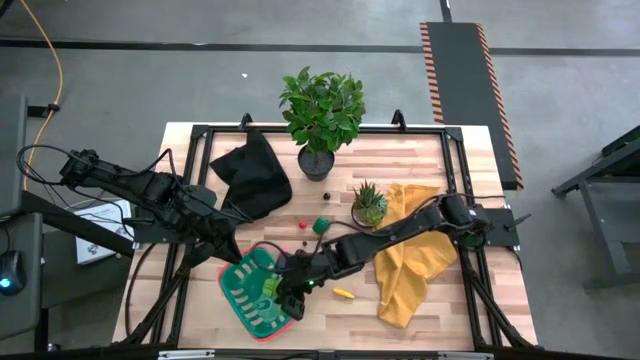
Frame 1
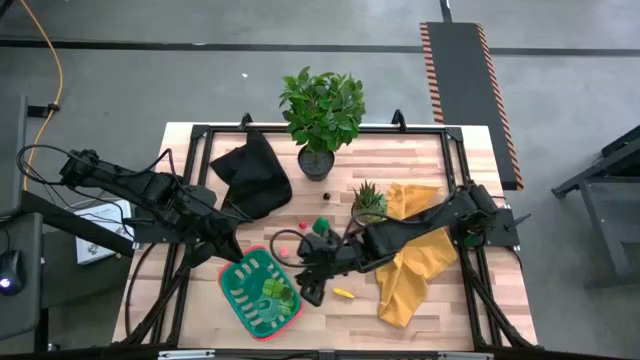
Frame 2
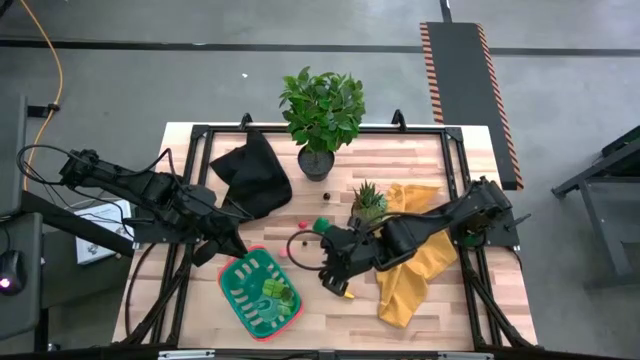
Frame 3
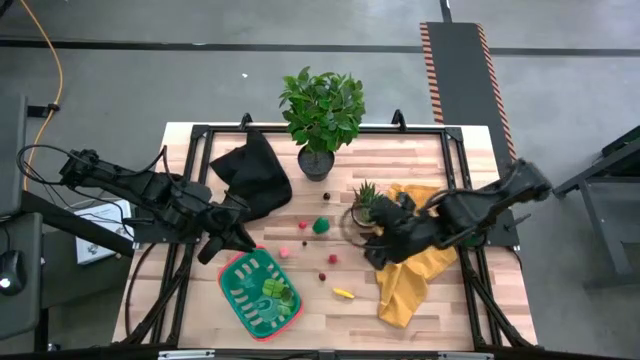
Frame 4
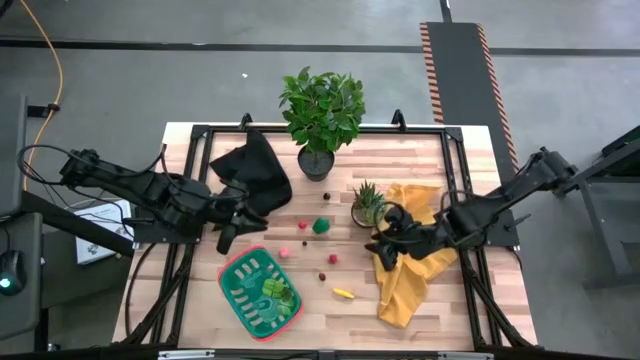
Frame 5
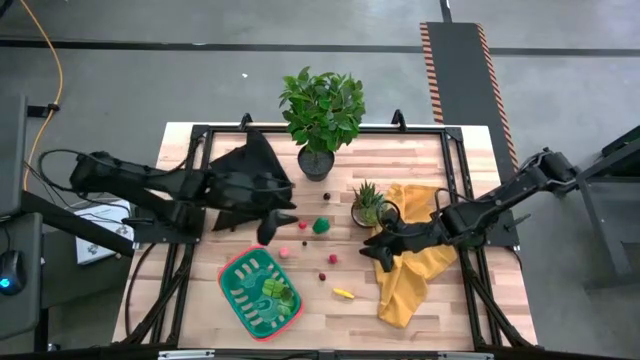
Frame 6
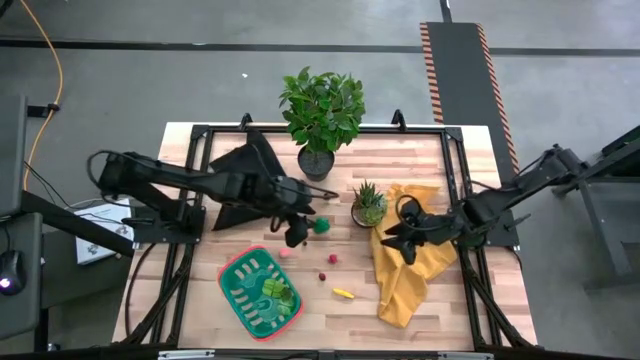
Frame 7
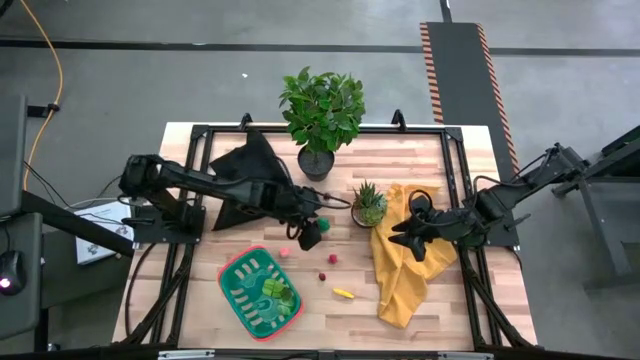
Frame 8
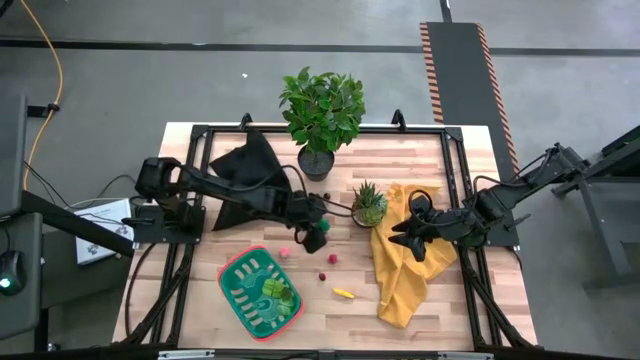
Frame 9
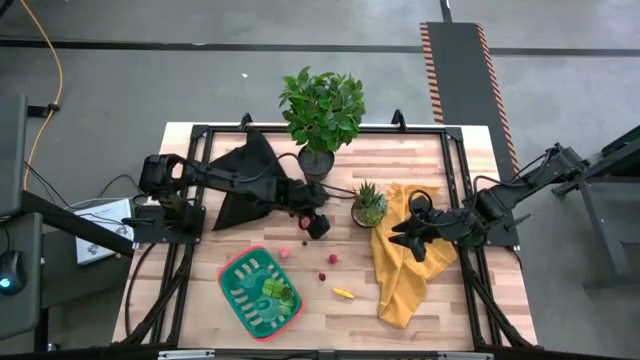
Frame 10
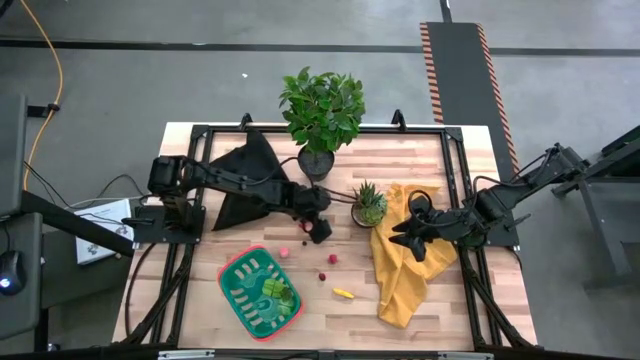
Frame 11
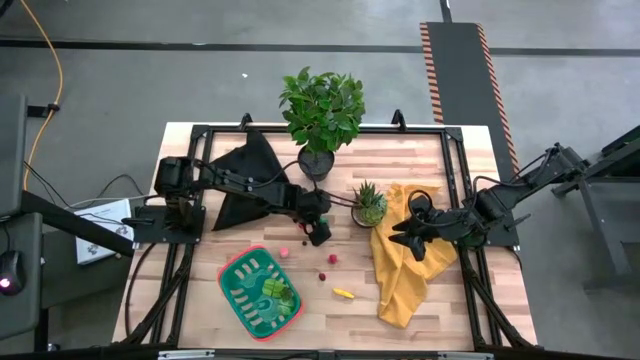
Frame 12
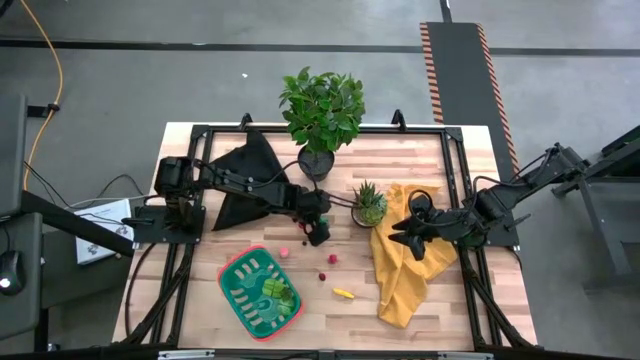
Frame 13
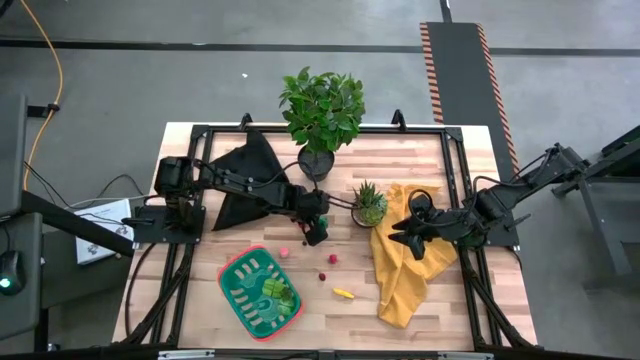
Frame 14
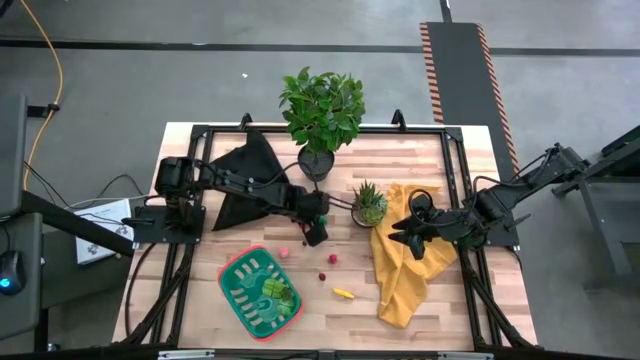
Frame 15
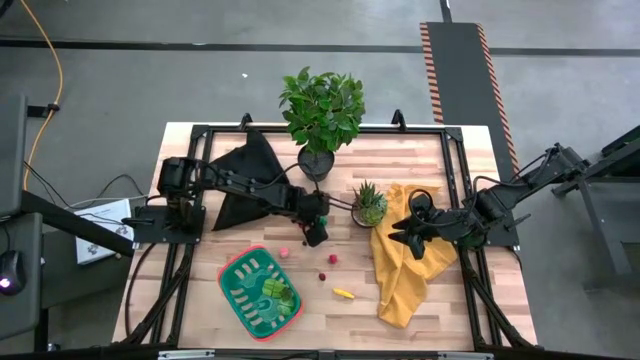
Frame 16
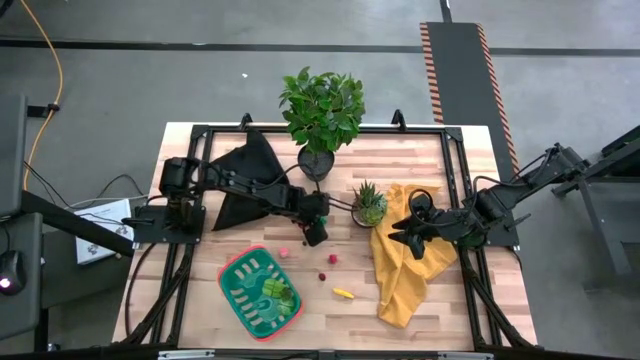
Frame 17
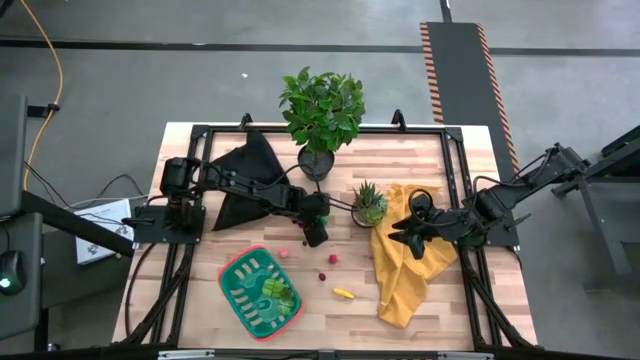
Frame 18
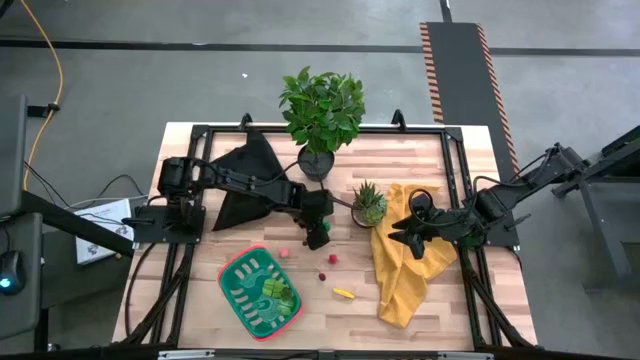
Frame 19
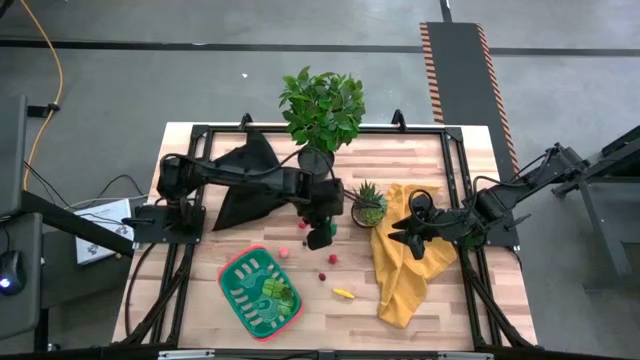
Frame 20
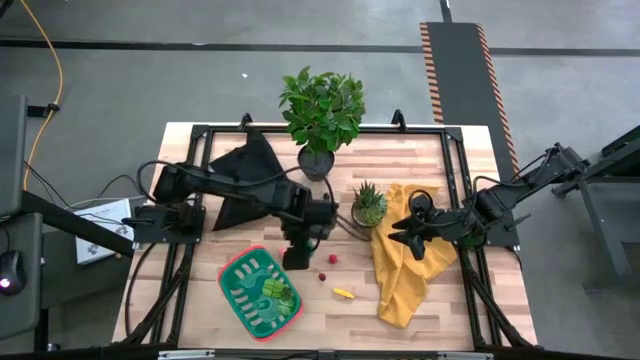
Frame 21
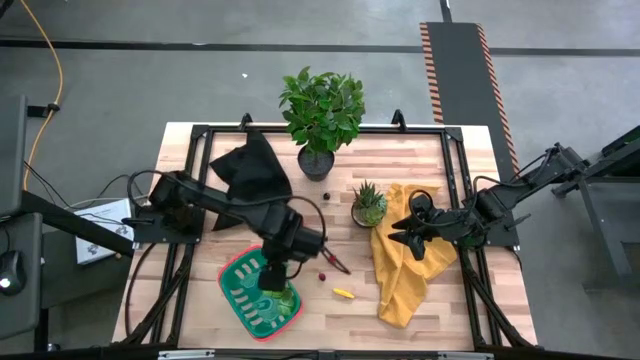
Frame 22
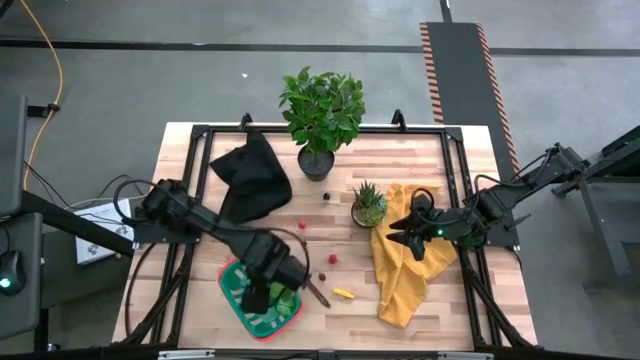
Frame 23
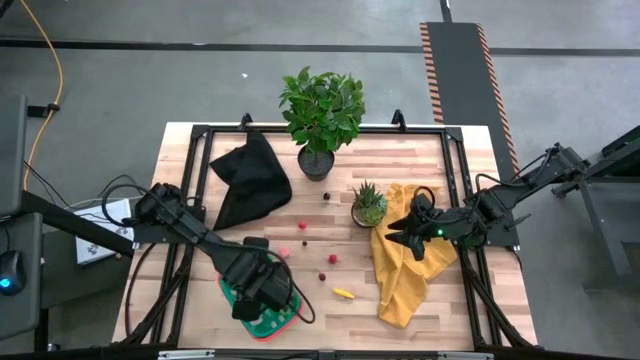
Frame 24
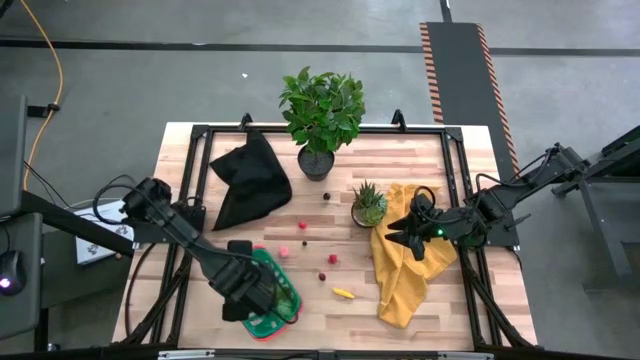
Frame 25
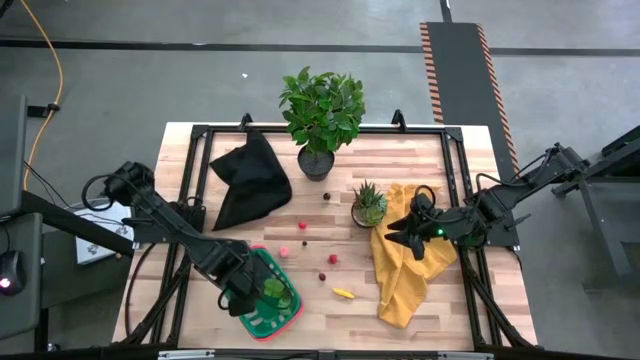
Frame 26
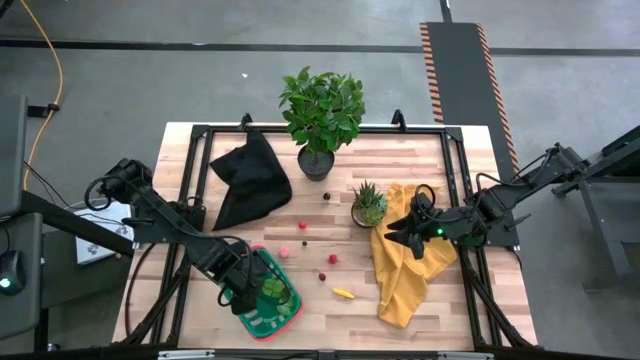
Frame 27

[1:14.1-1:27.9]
Task: Pick and placing Produce into tupperware
Put the green bell pepper into the blue basket

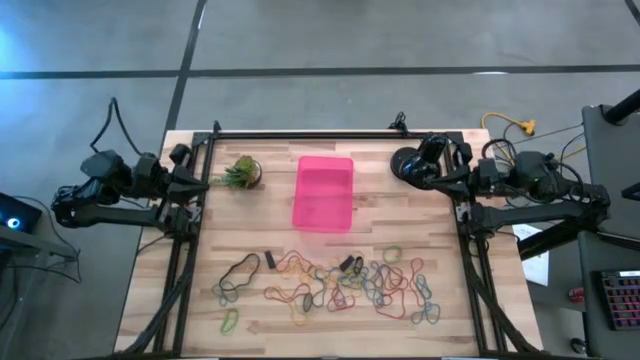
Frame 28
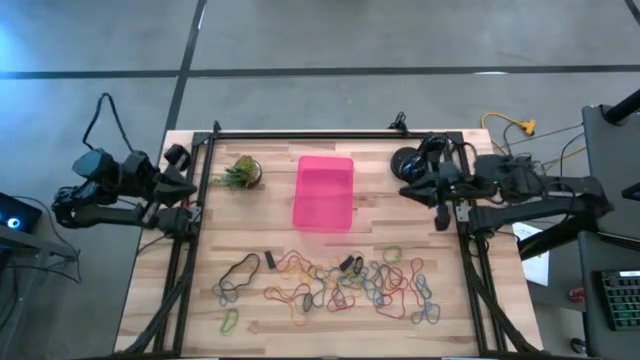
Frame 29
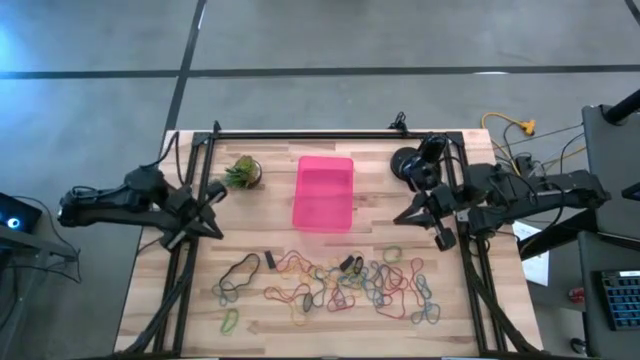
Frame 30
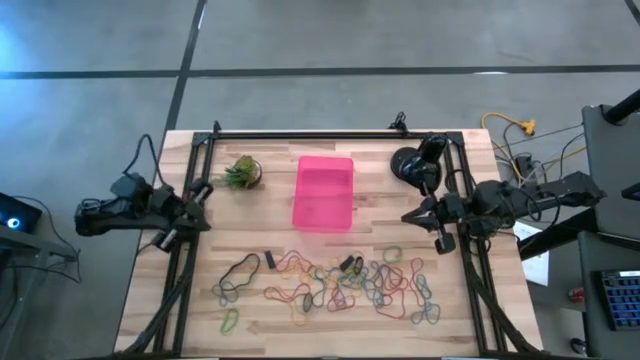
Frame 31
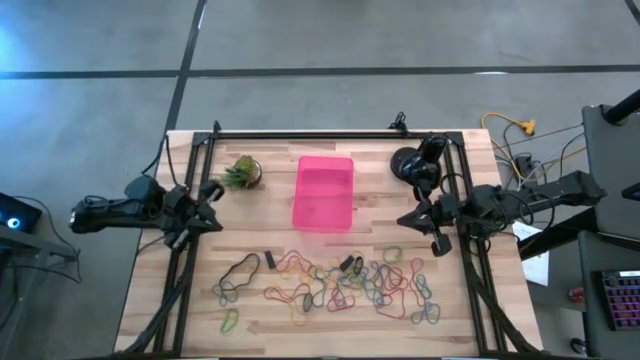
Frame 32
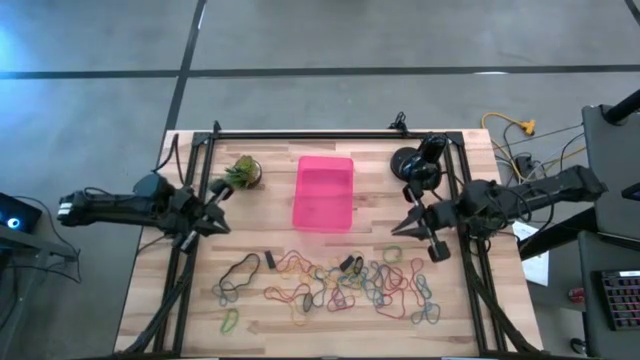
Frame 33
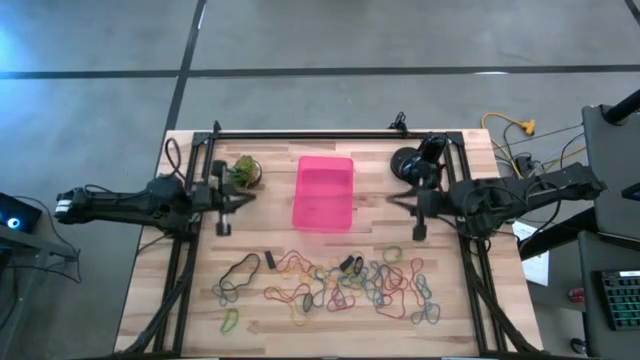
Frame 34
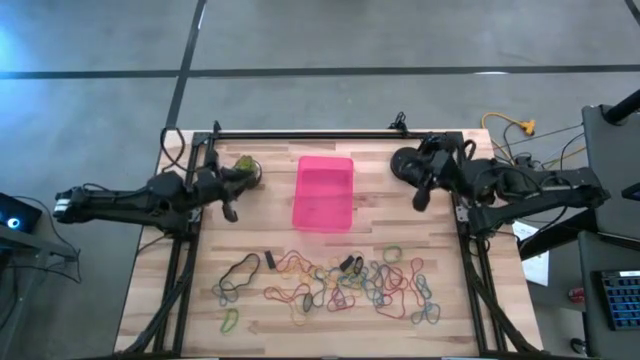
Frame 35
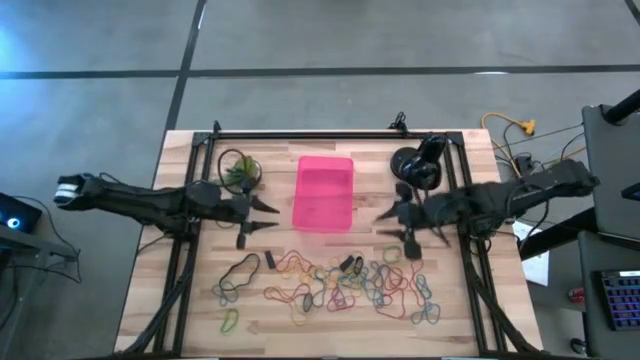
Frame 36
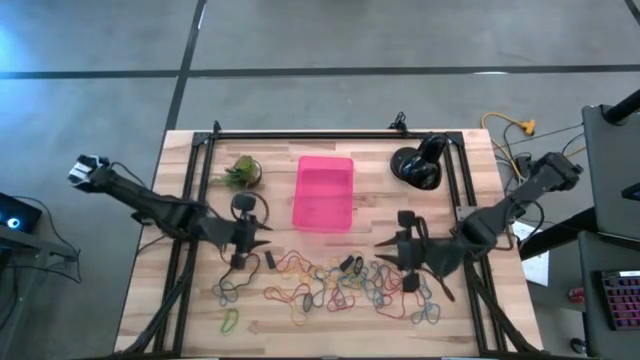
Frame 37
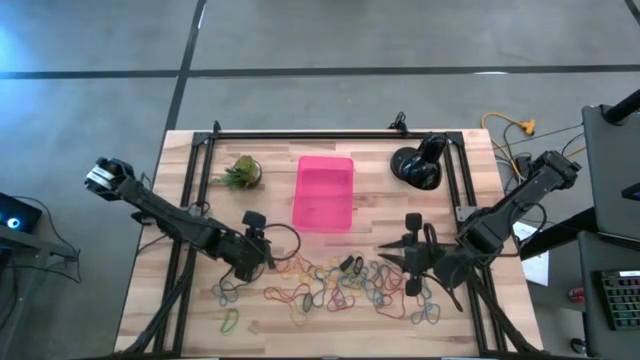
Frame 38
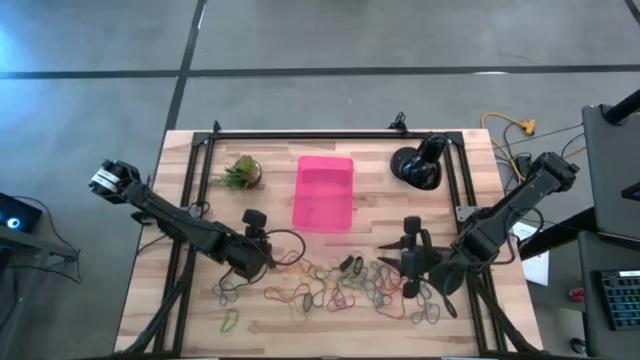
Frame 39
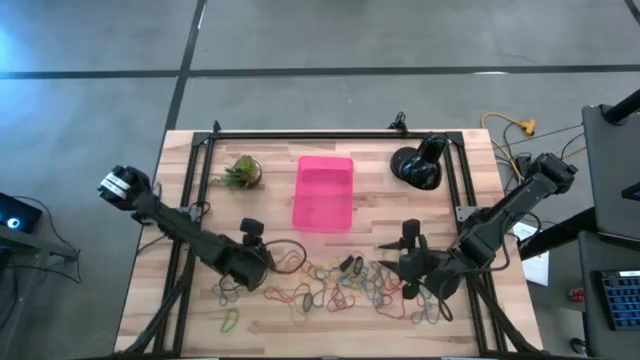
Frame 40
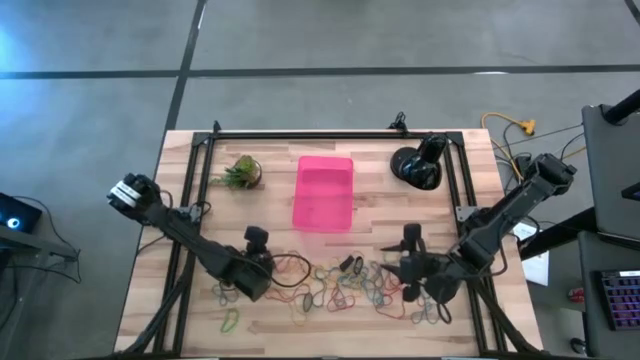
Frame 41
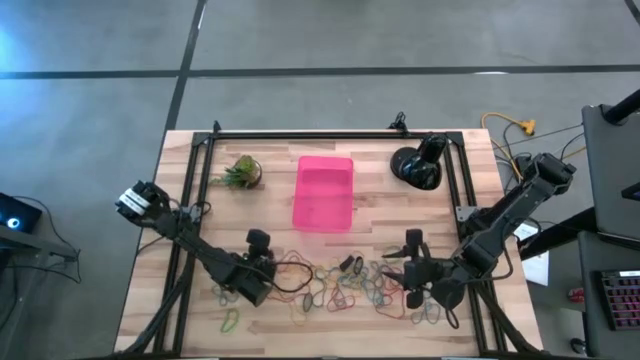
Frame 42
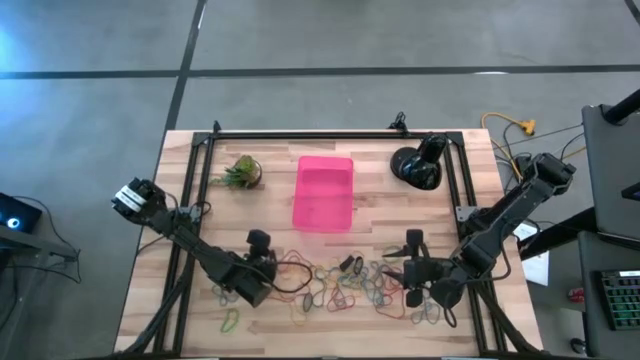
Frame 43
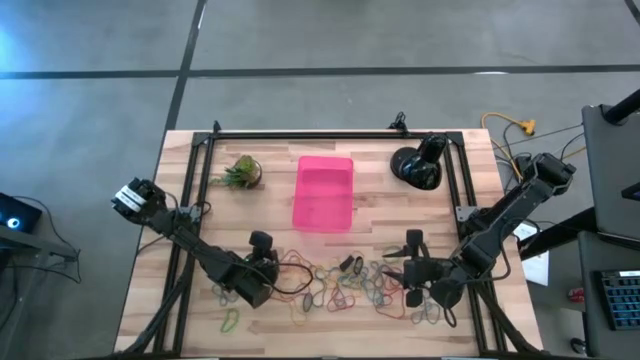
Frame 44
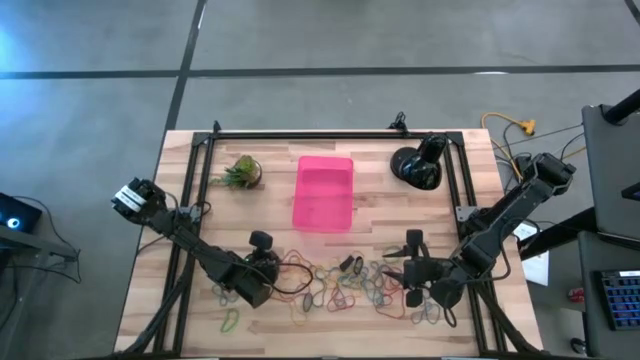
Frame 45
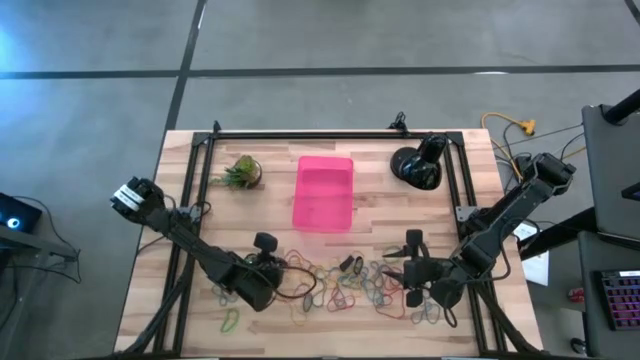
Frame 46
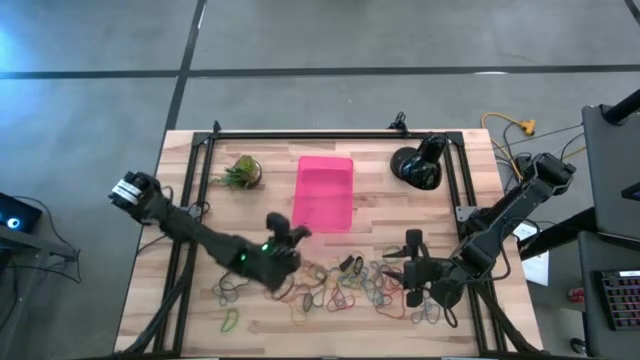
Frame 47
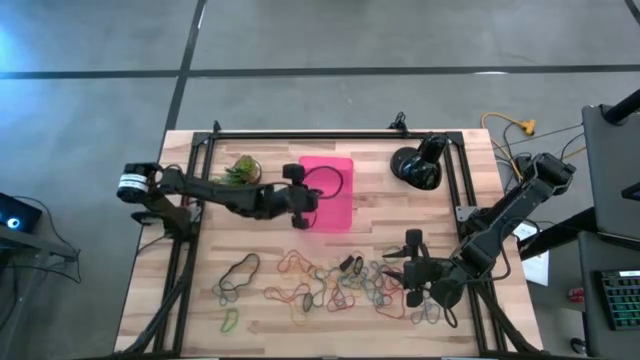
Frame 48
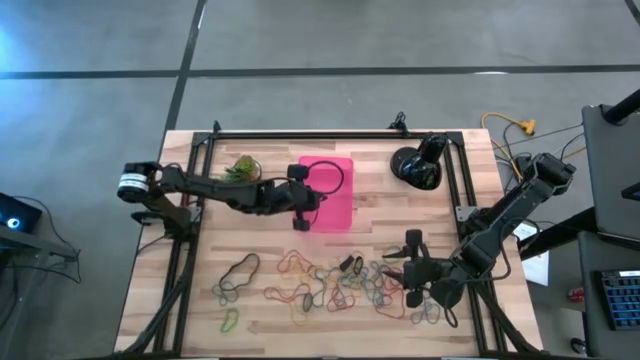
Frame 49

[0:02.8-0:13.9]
Task: Pick and place rubber bands into bin
Put the black rubber bands into the pink bin
